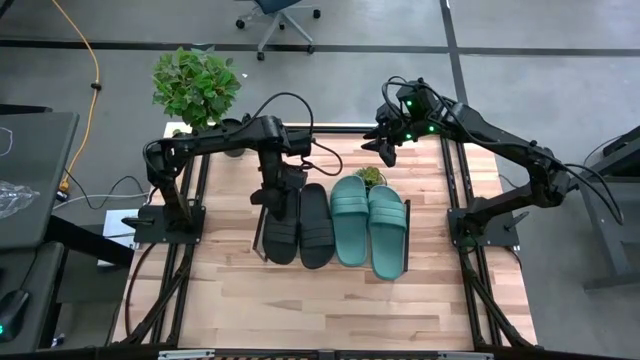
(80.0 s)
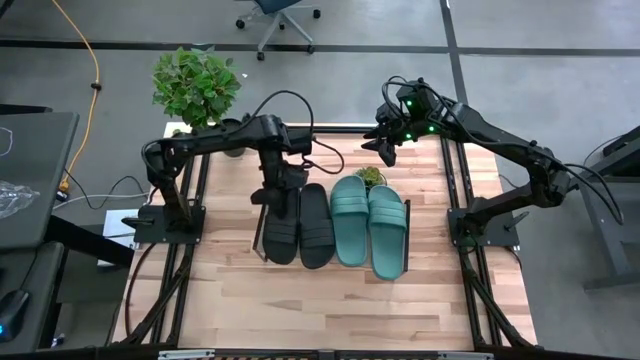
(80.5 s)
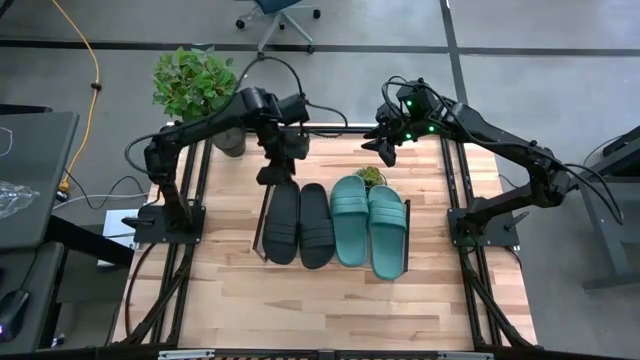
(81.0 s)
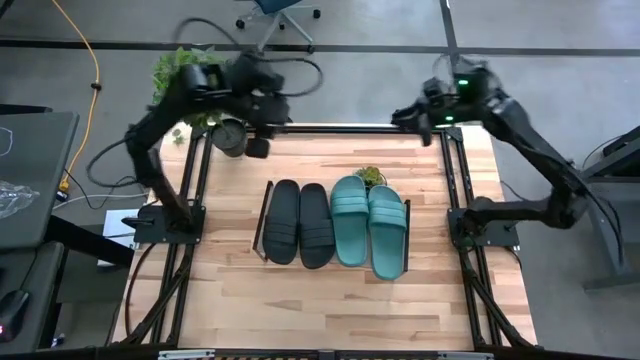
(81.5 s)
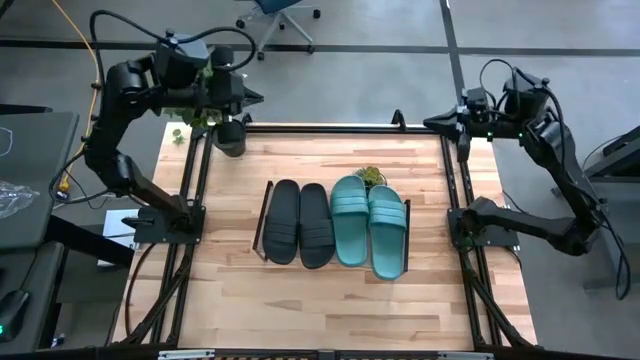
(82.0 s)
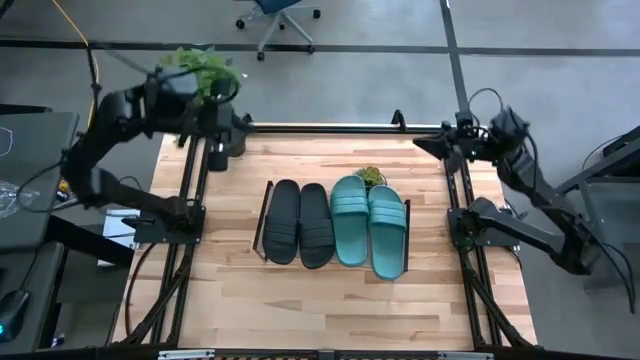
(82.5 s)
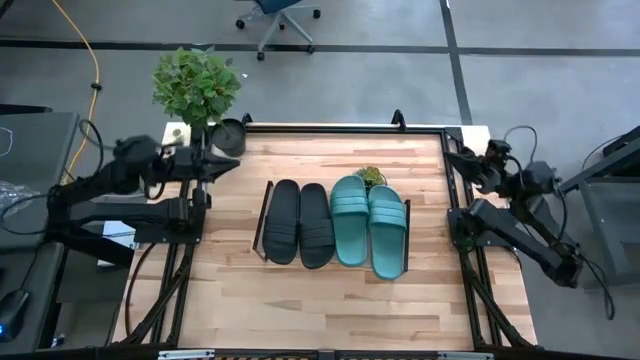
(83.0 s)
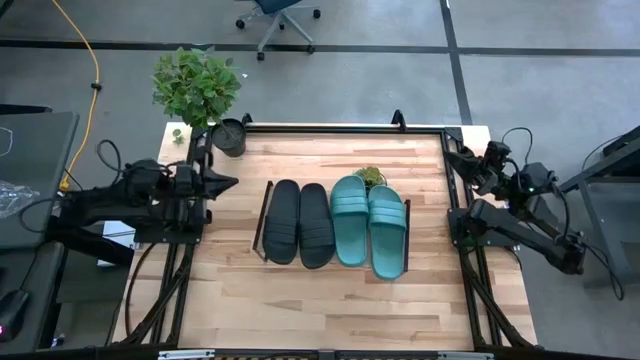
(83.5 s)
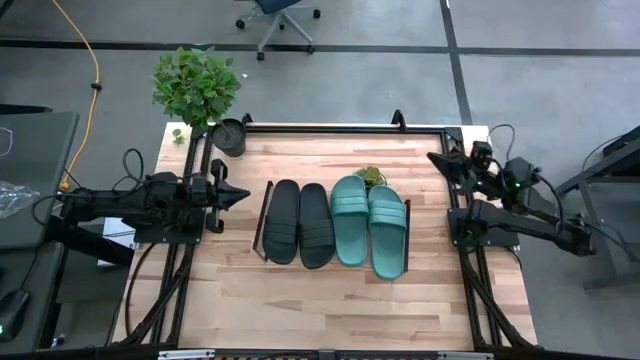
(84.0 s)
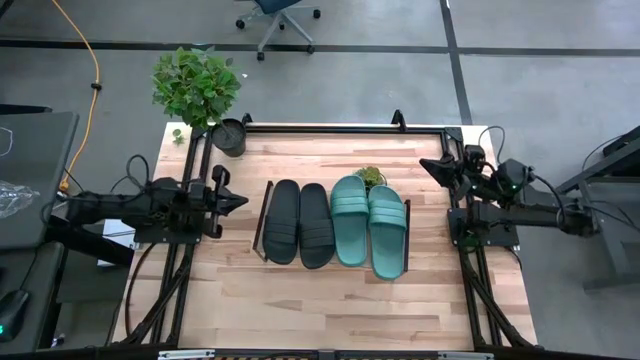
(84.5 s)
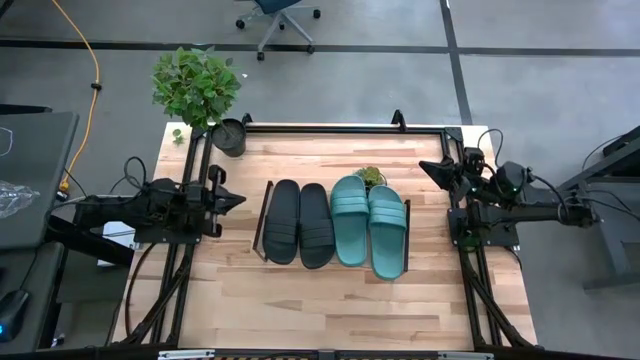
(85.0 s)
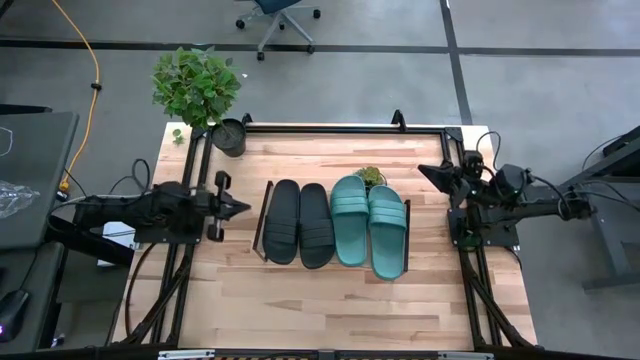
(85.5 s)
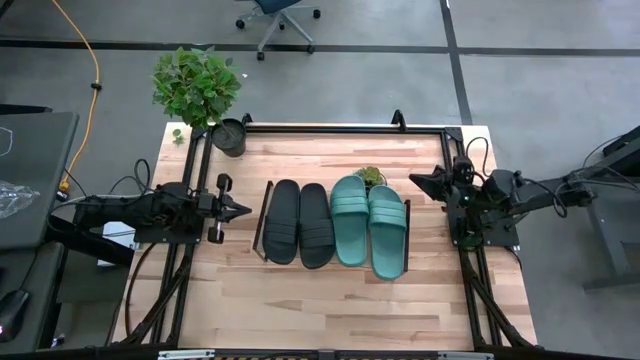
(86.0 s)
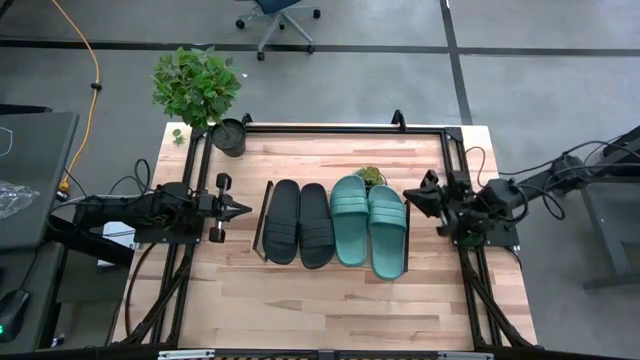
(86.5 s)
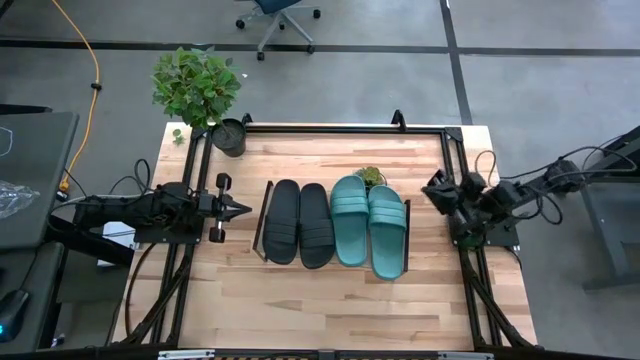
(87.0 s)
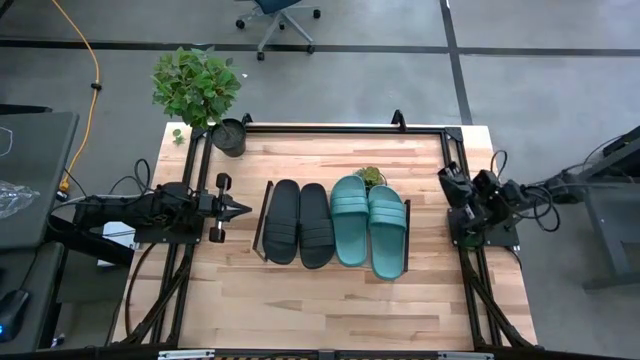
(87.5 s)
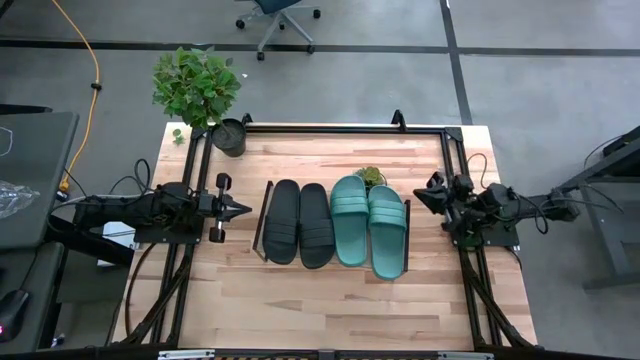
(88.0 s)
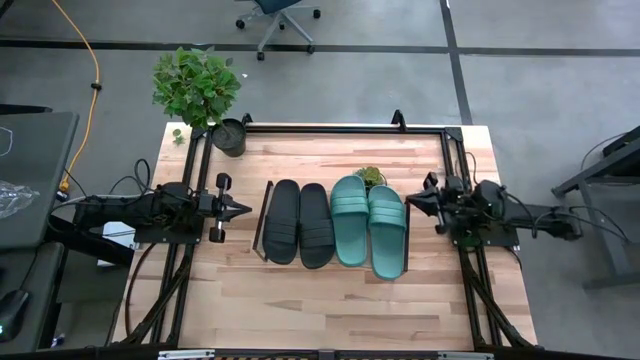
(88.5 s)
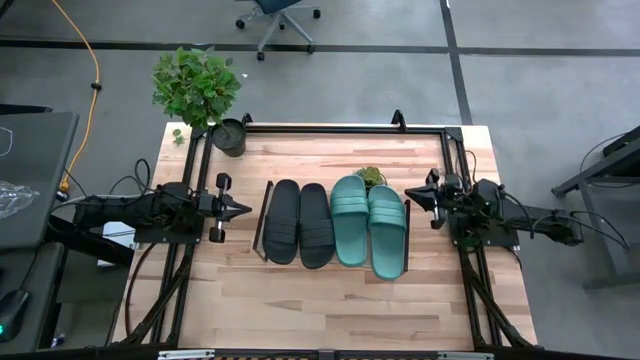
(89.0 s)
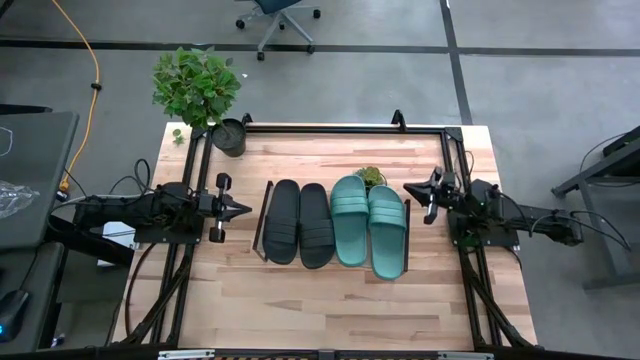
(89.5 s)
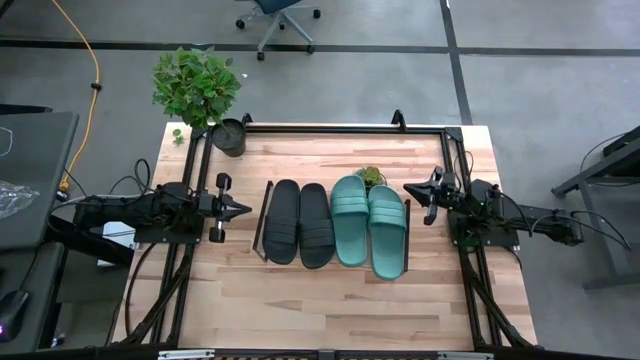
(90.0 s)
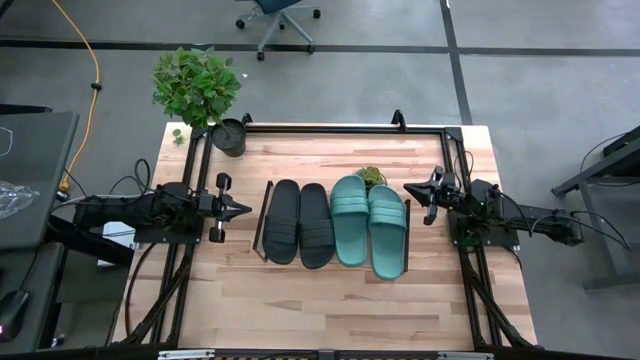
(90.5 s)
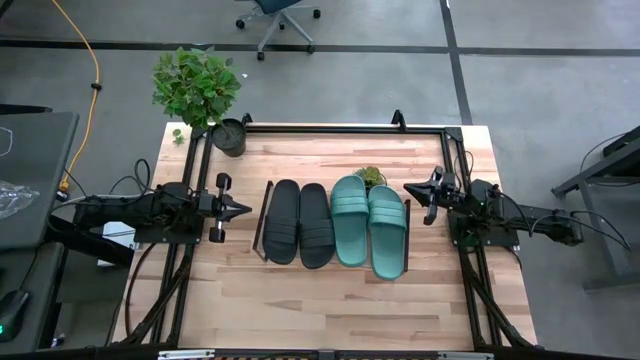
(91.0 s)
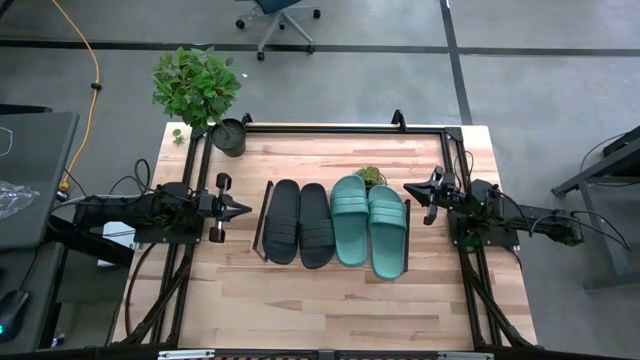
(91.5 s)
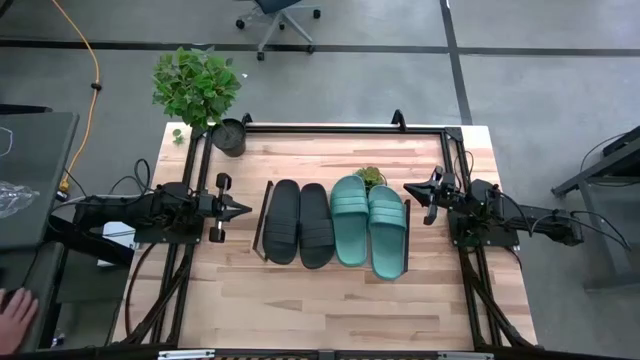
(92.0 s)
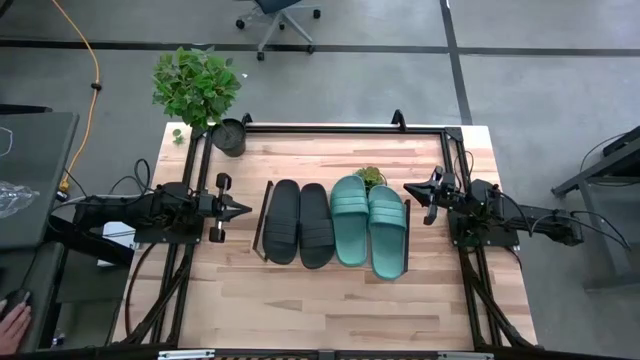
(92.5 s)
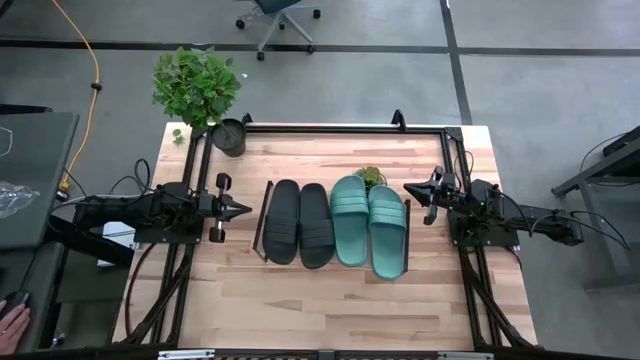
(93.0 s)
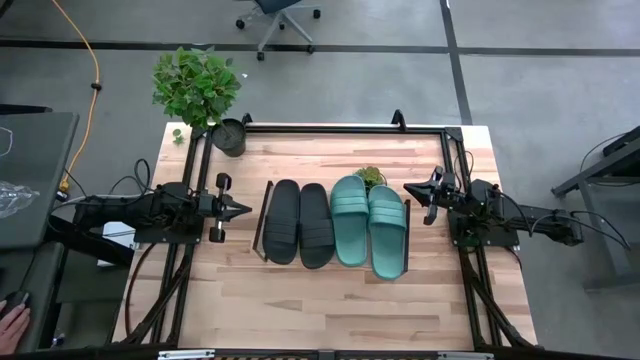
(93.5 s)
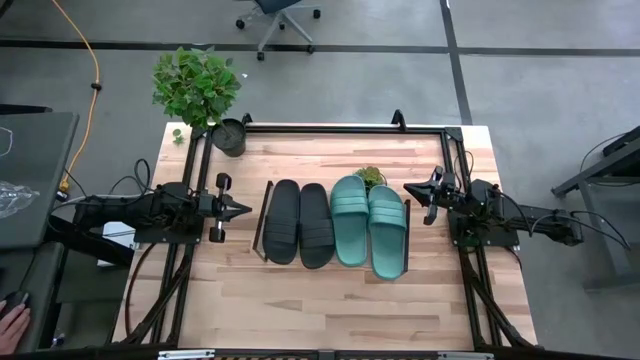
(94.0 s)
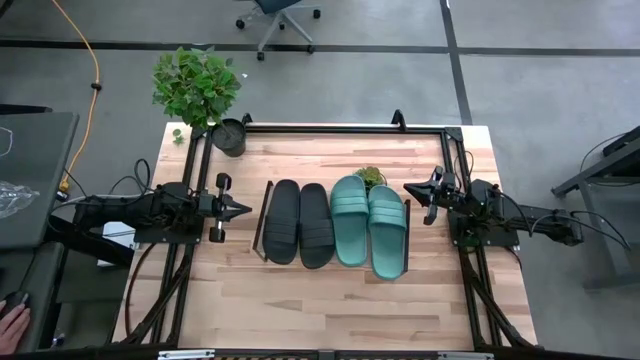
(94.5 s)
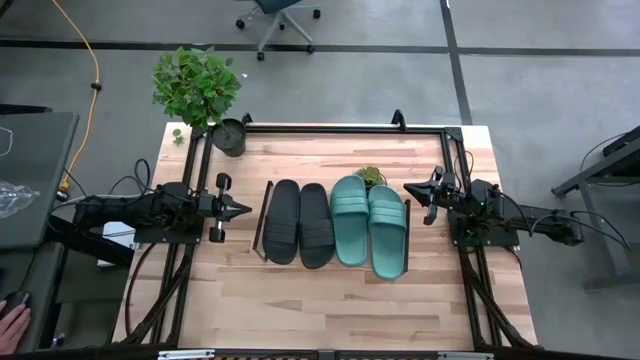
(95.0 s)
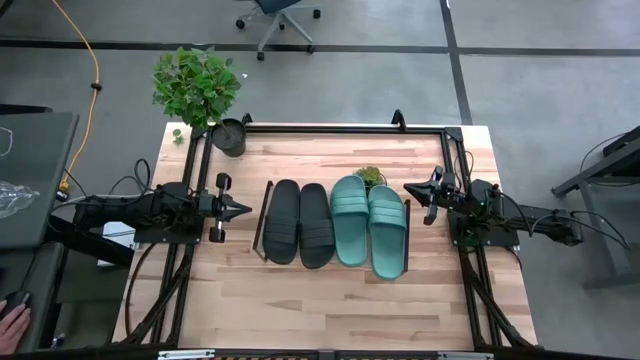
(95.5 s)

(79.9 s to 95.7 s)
Task: Pick and place slides into the shelf
Return to Home Position

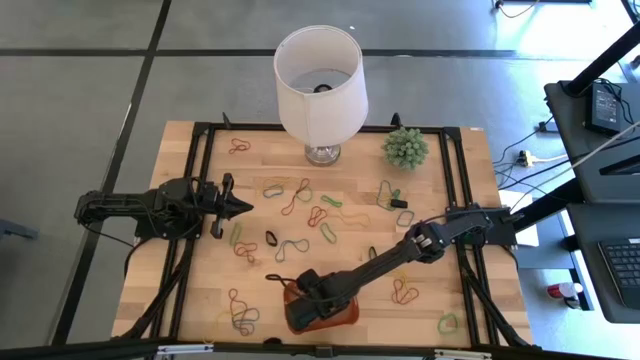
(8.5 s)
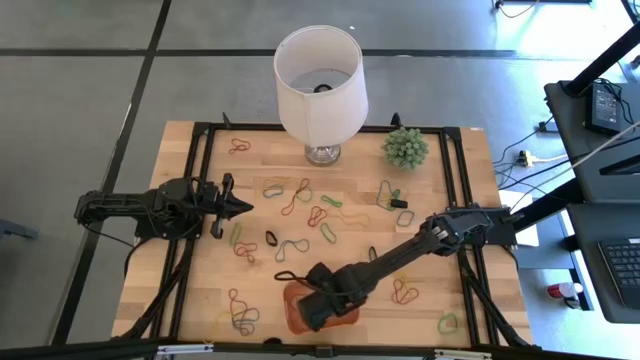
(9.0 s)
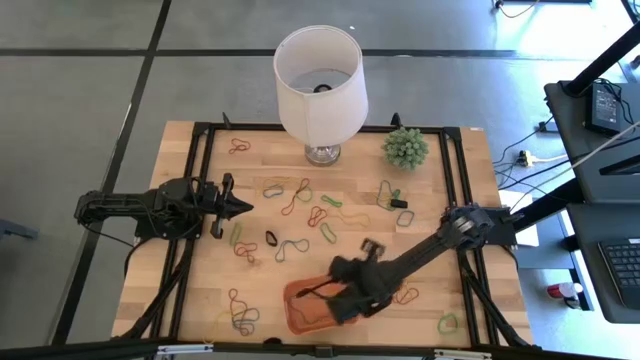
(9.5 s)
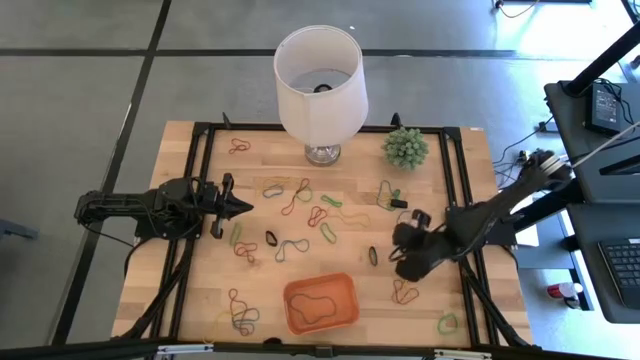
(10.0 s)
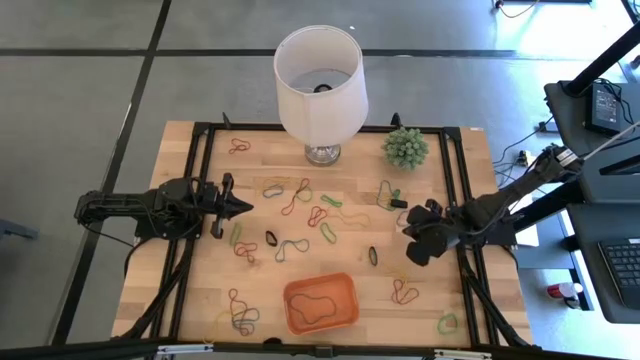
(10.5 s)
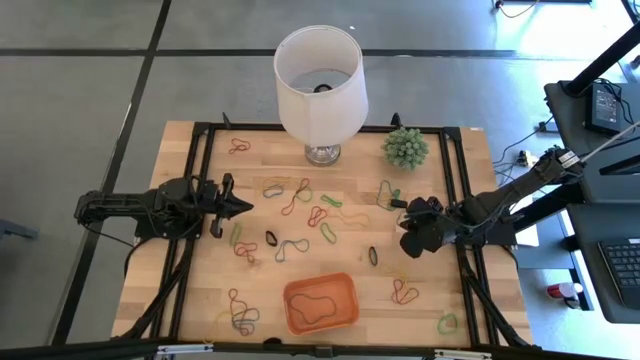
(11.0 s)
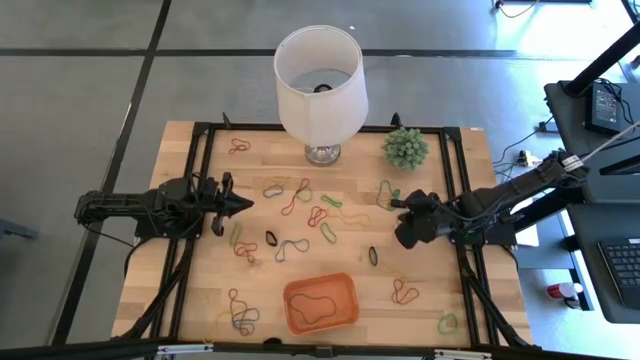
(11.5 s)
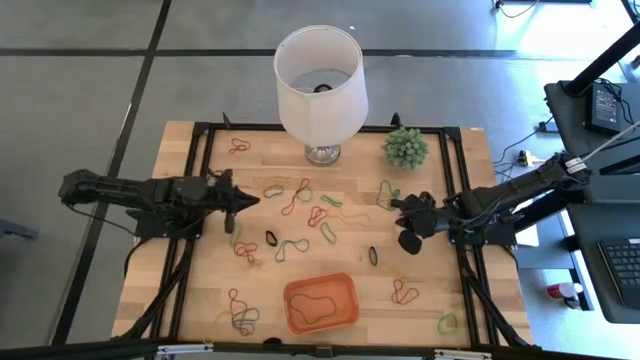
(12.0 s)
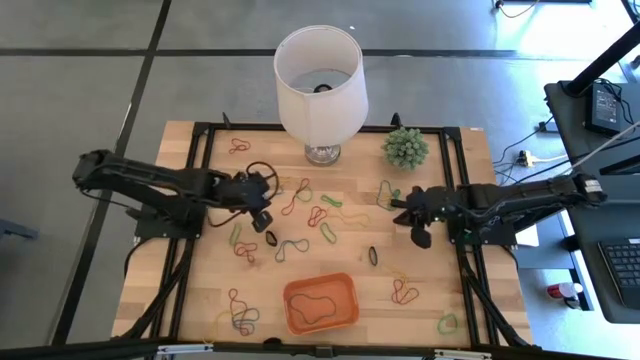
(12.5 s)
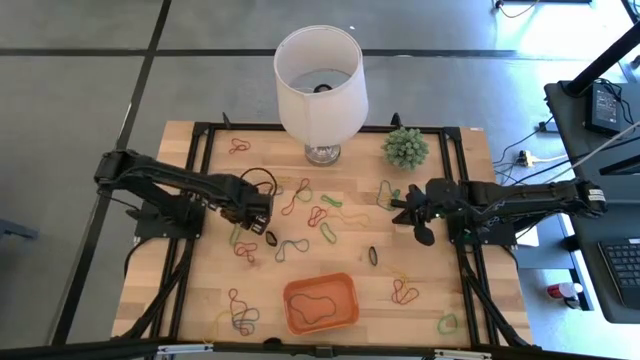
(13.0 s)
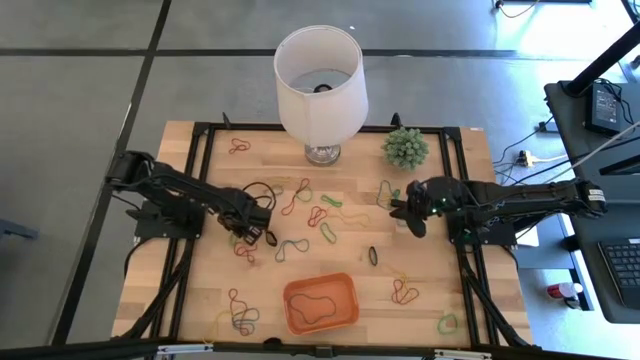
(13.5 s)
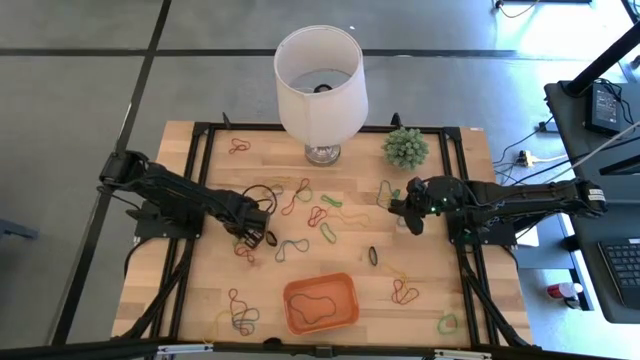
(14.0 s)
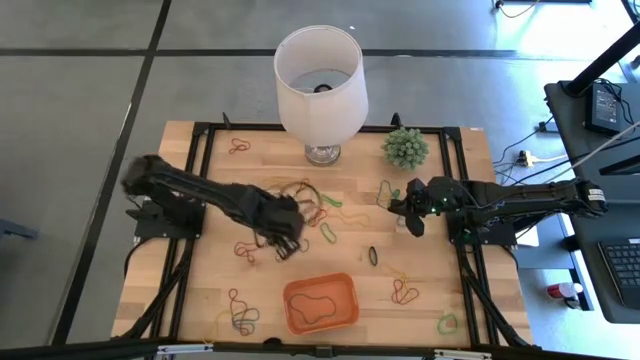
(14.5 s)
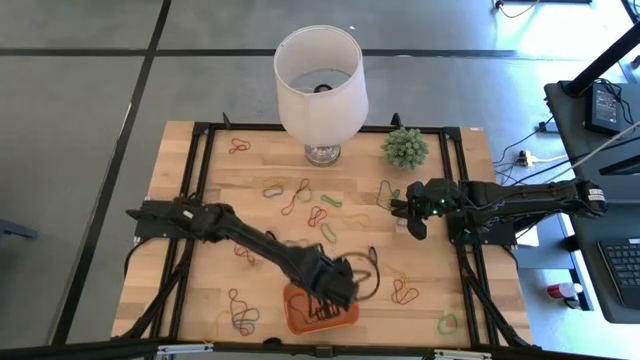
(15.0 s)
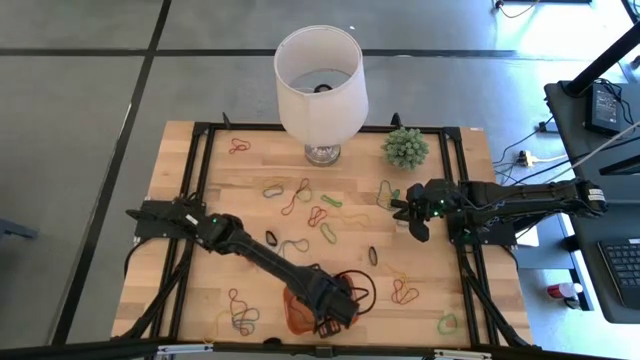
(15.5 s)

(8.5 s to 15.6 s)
Task: Pick and place rubber bands into bin
Put the green rubber band into the orange bin
